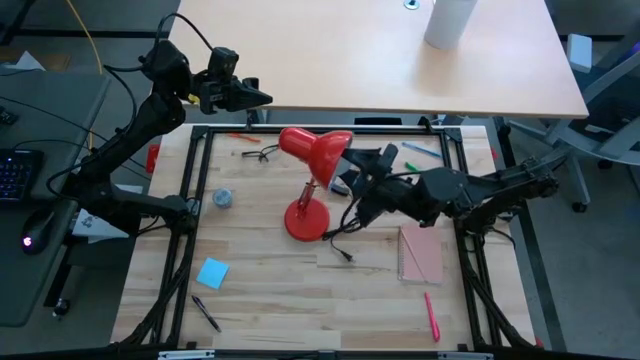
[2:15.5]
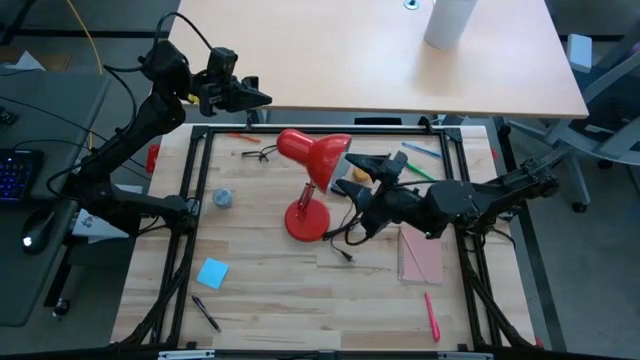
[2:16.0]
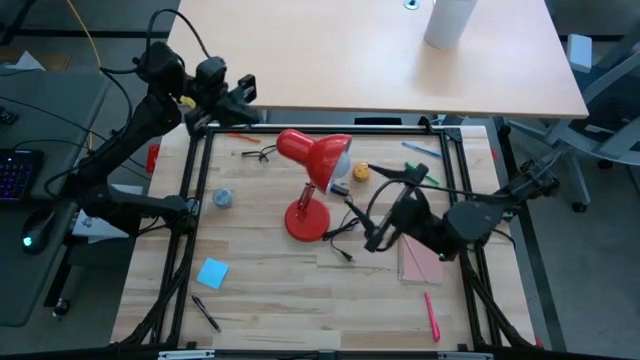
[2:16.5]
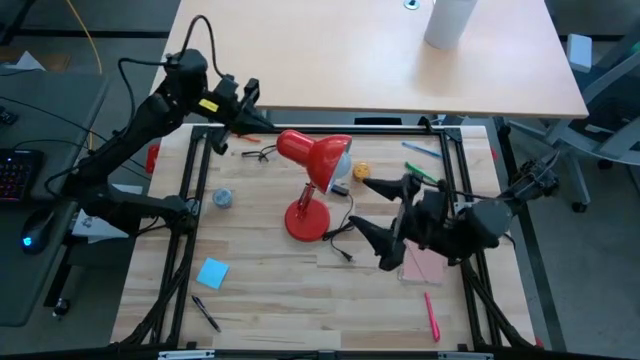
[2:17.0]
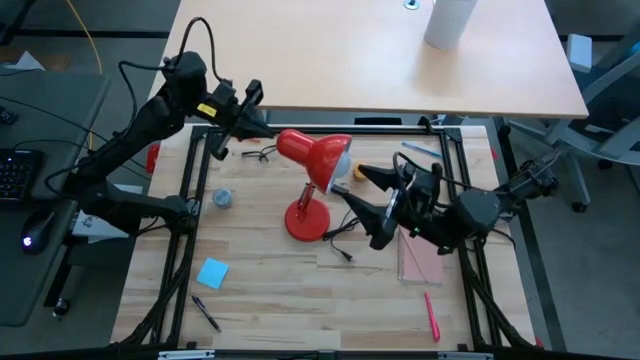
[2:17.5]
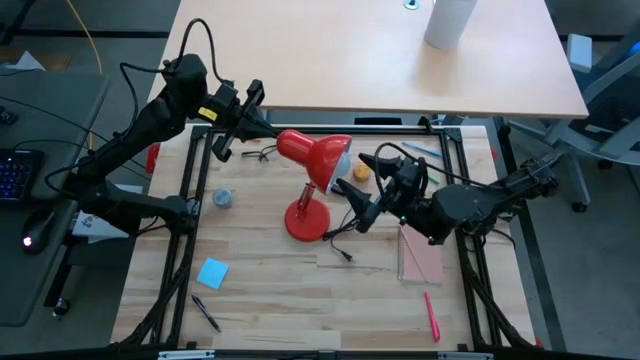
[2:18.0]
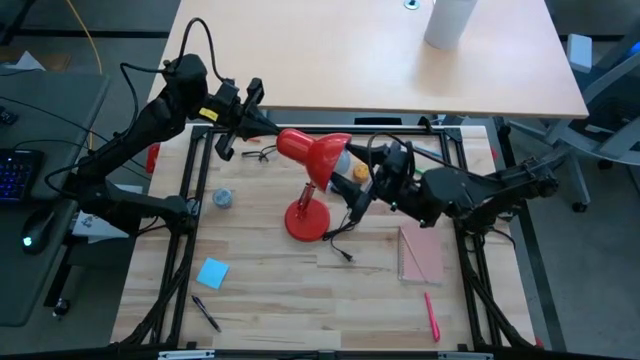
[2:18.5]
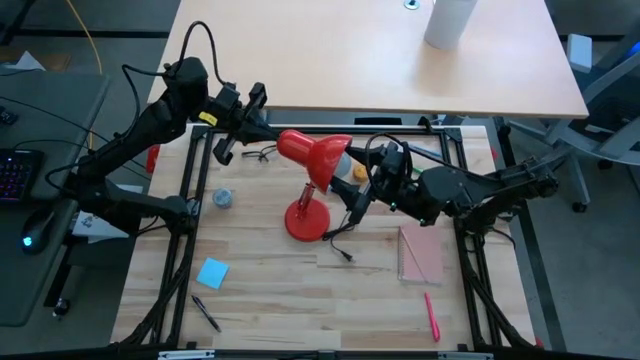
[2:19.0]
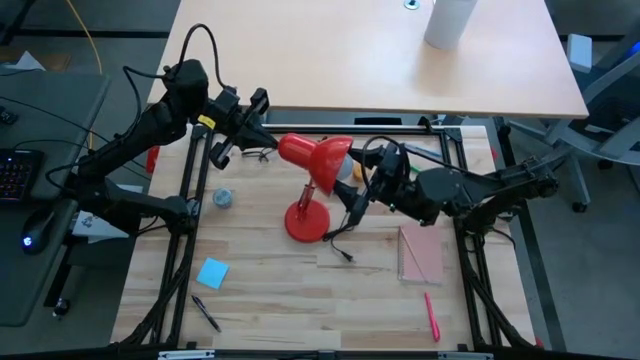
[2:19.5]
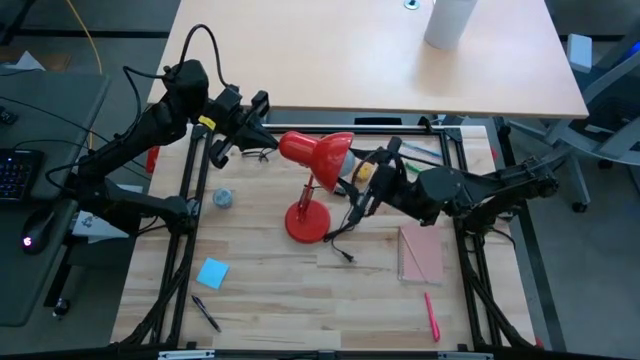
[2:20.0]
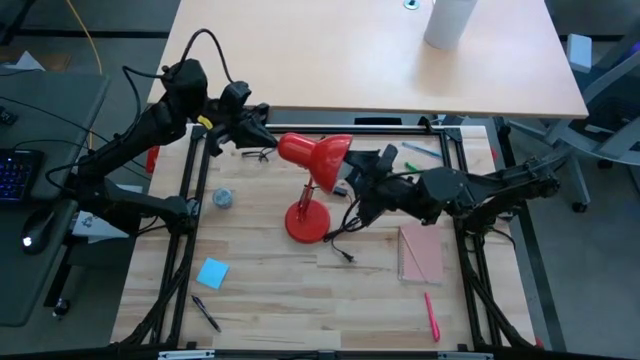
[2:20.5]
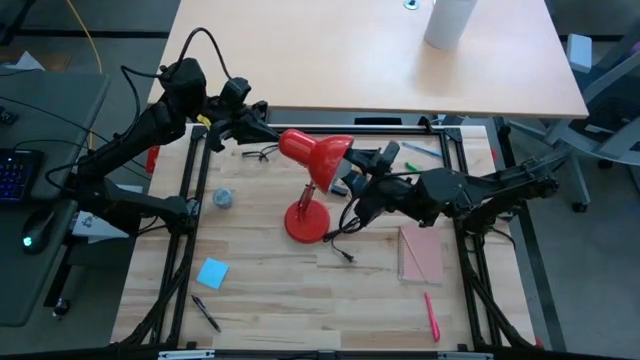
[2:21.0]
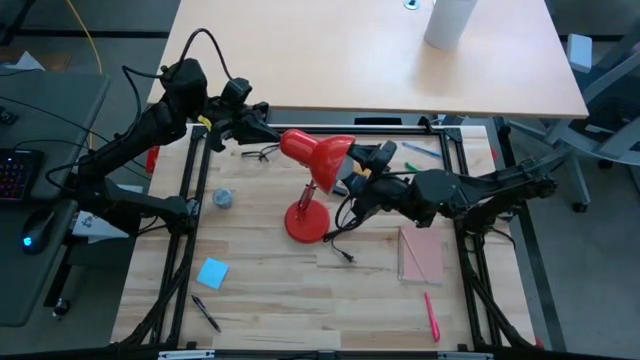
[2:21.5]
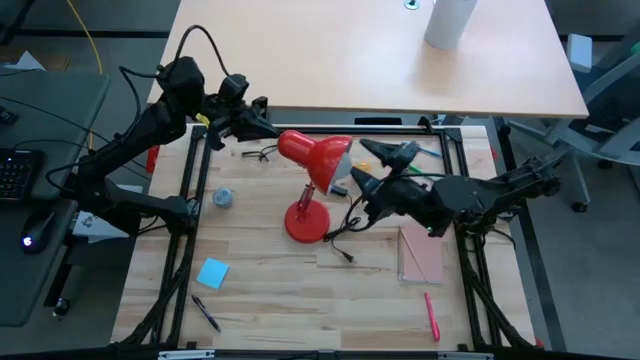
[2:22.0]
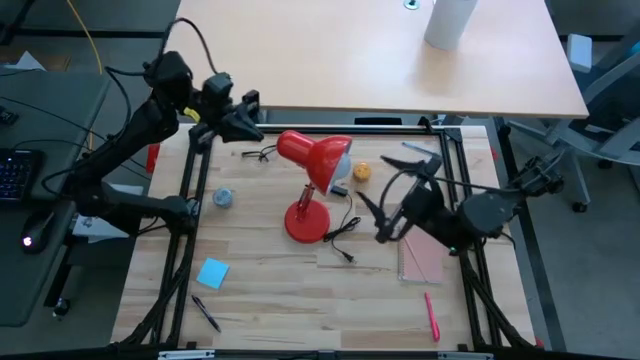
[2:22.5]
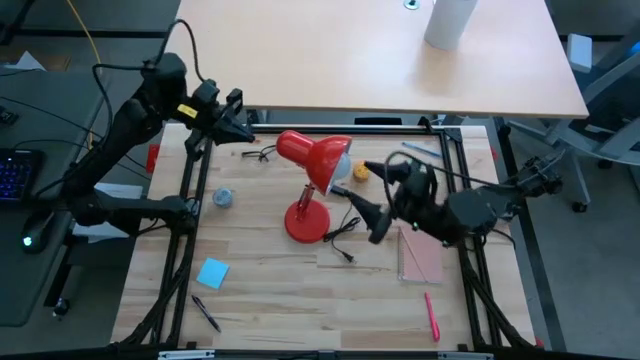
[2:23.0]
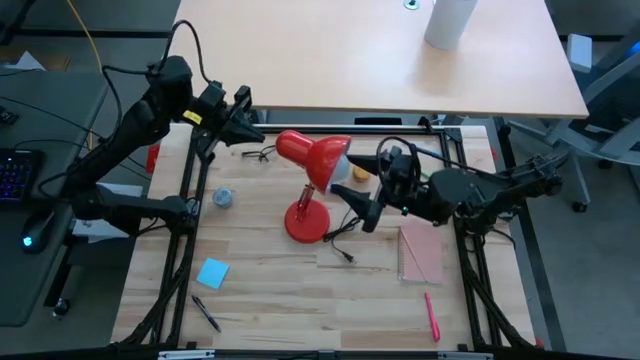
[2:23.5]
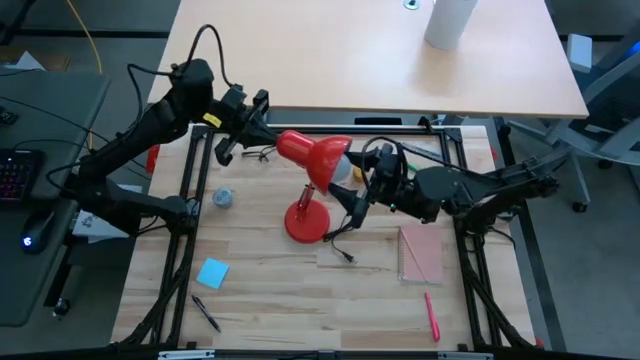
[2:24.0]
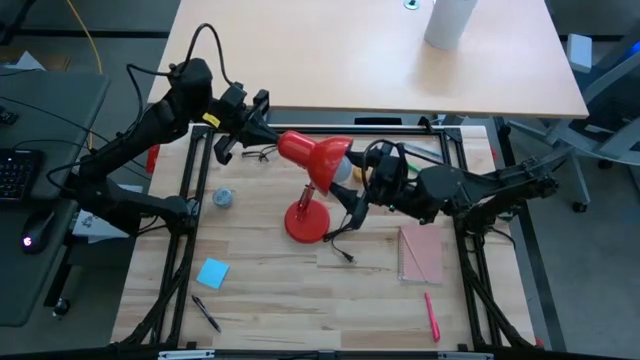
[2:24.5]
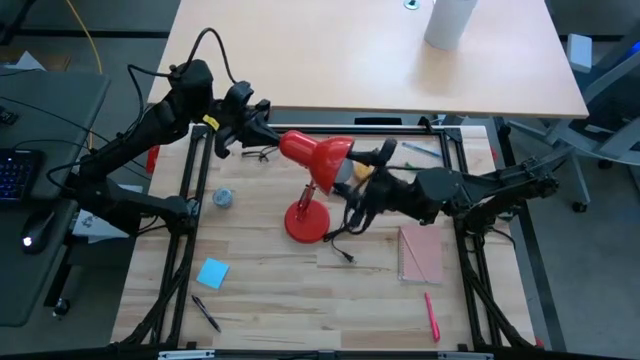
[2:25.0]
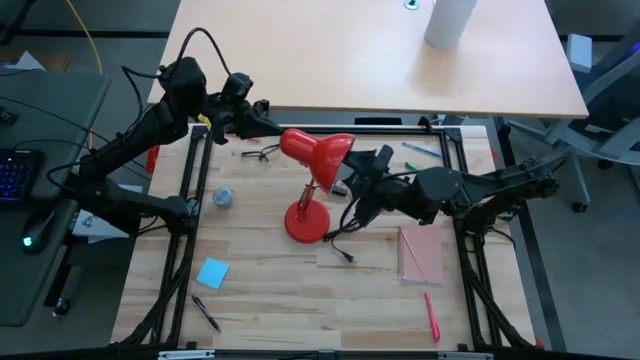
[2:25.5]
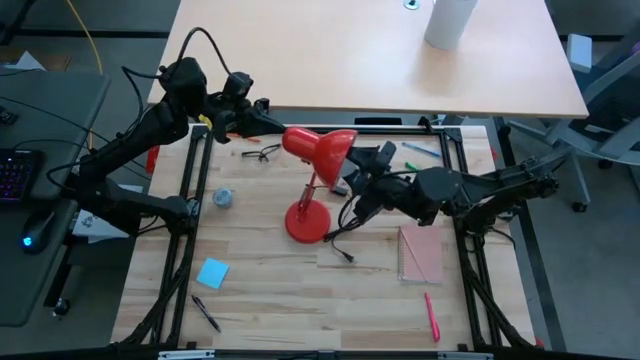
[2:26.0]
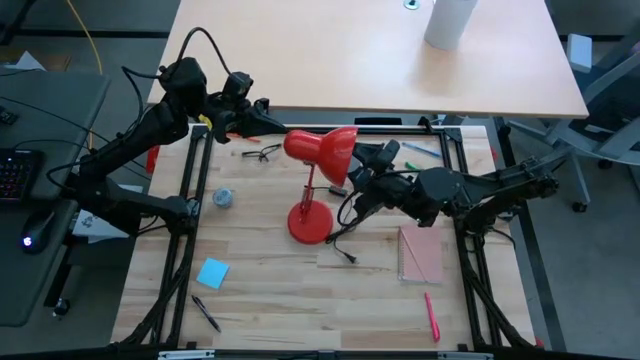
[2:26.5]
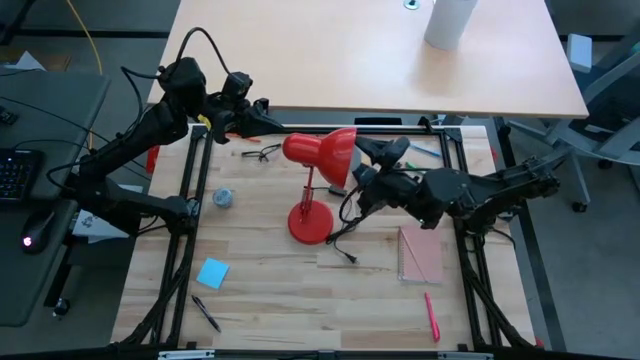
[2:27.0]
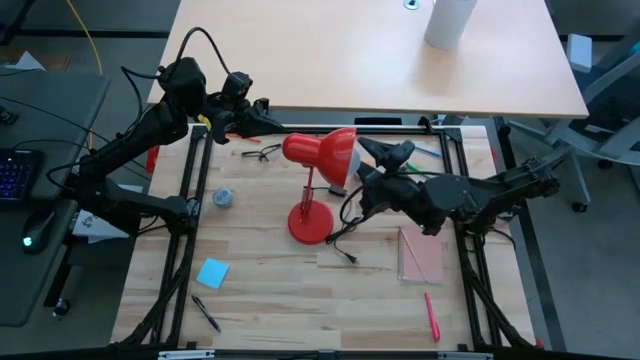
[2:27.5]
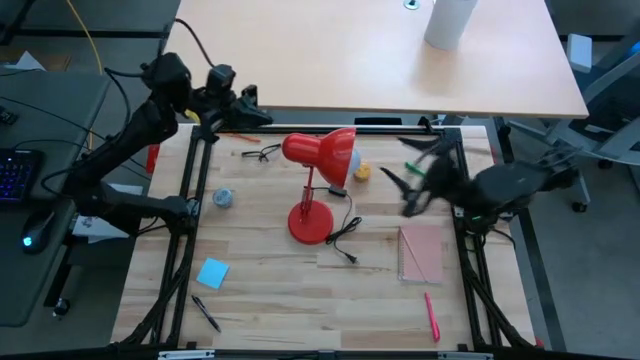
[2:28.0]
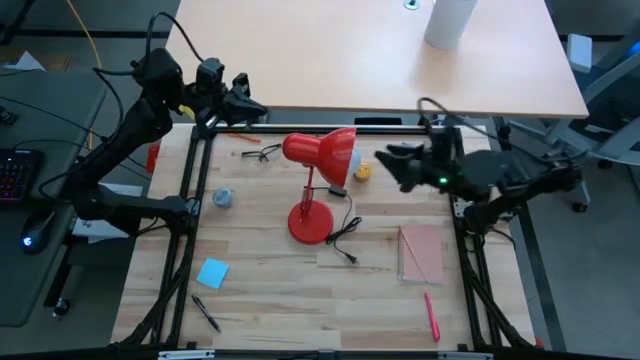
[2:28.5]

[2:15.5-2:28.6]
Task: Screw lightbulb
Remove the lightbulb into the lamp

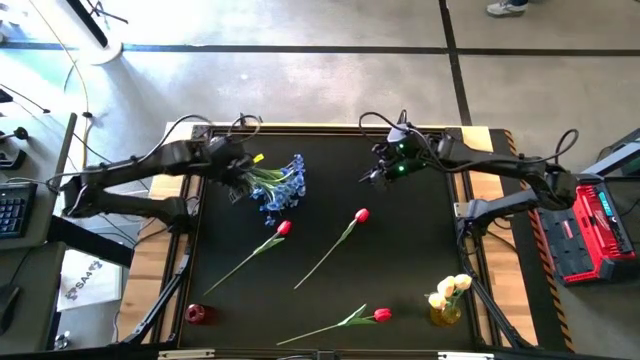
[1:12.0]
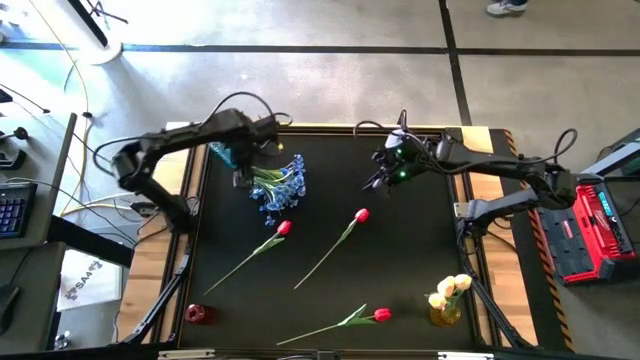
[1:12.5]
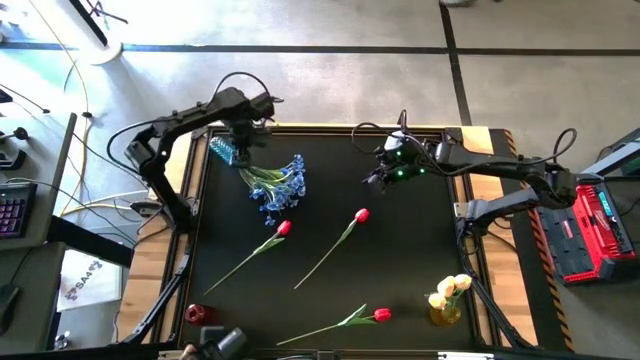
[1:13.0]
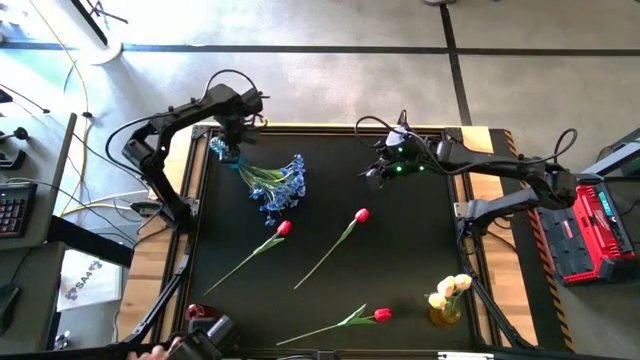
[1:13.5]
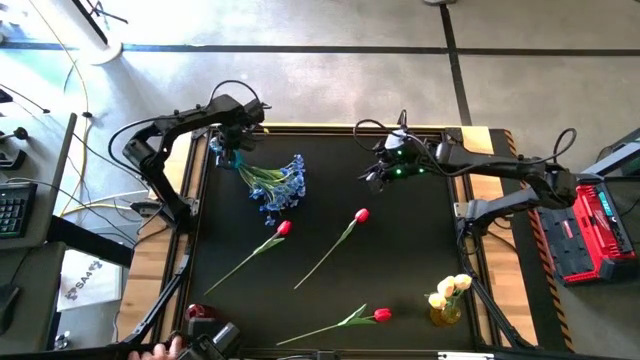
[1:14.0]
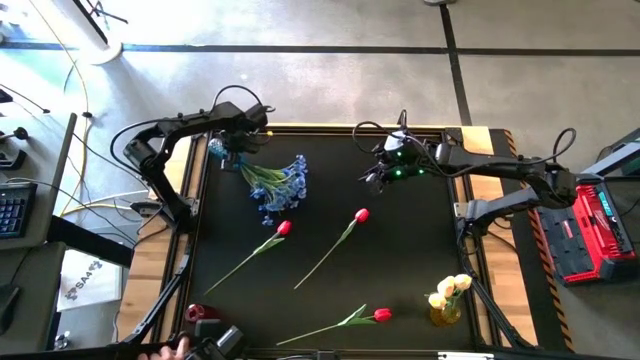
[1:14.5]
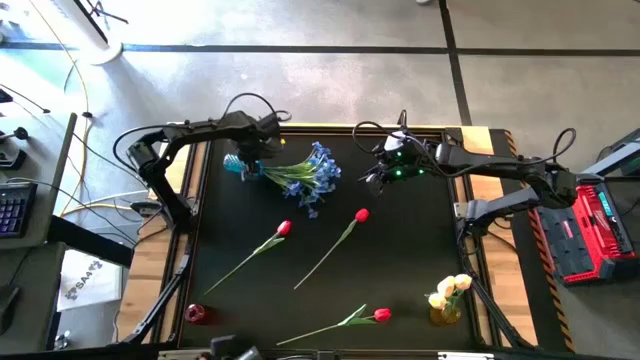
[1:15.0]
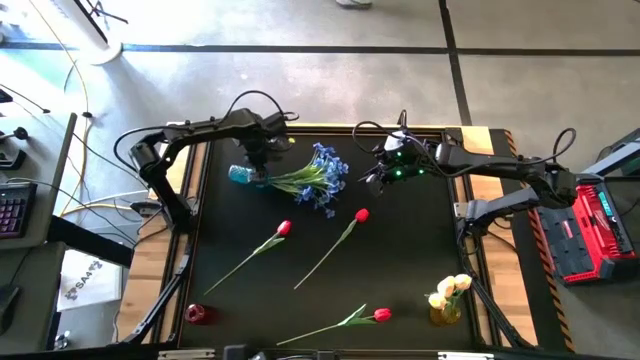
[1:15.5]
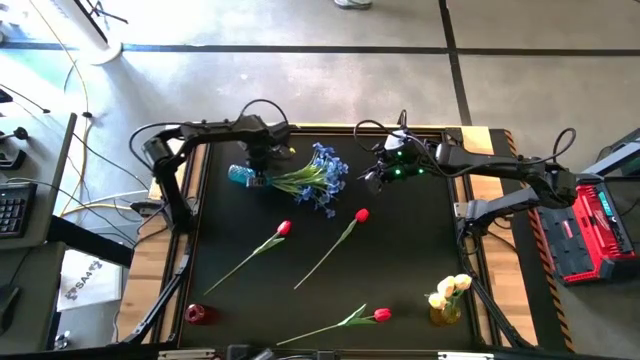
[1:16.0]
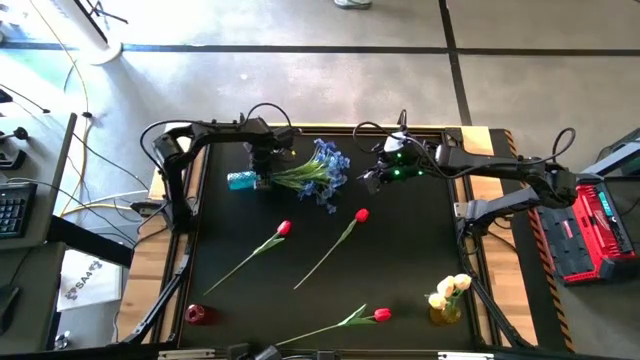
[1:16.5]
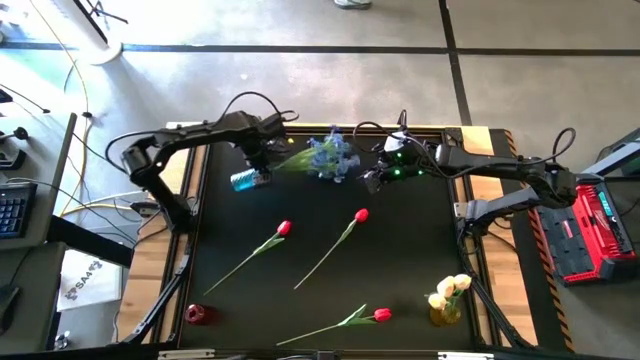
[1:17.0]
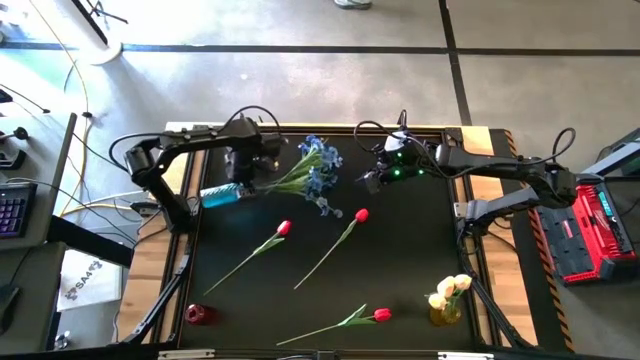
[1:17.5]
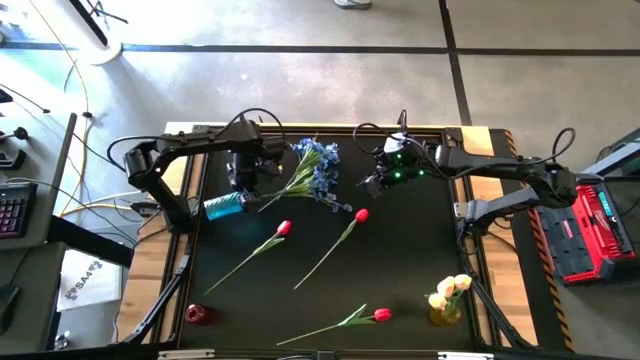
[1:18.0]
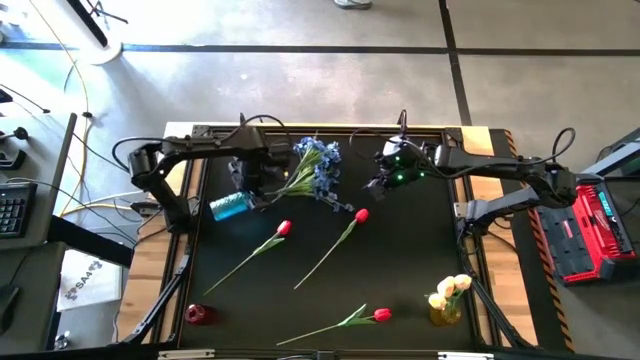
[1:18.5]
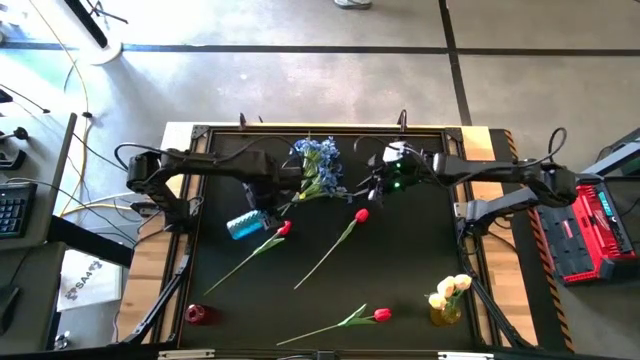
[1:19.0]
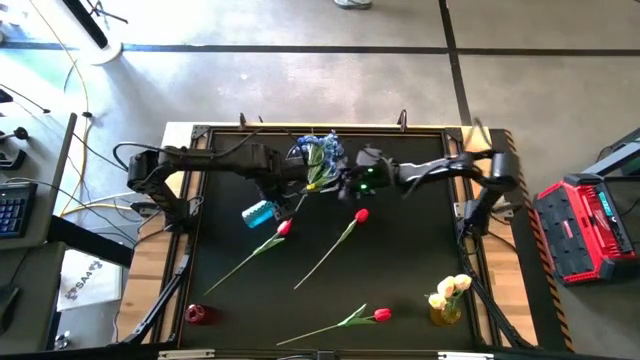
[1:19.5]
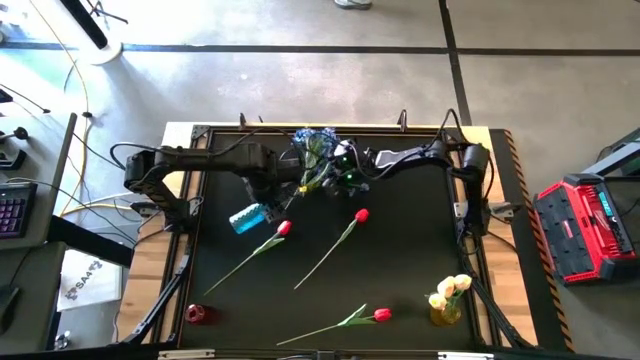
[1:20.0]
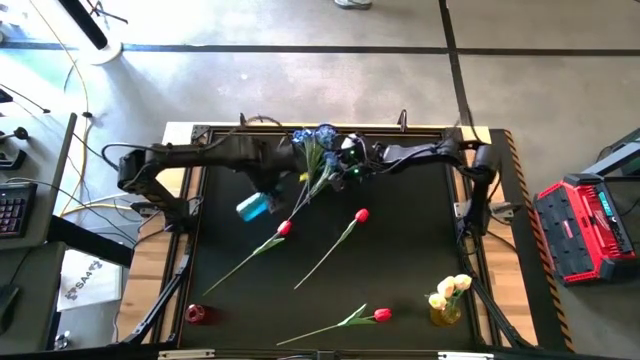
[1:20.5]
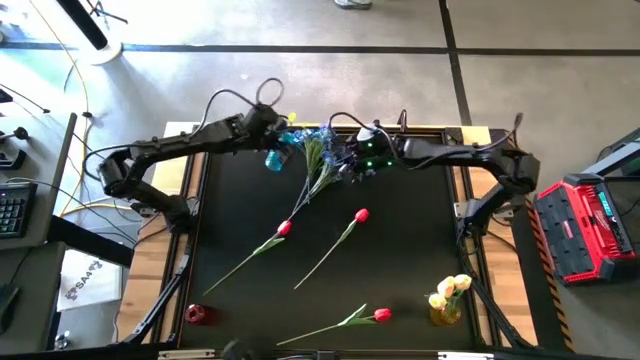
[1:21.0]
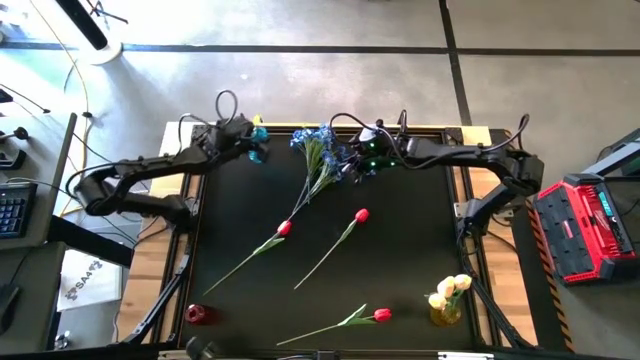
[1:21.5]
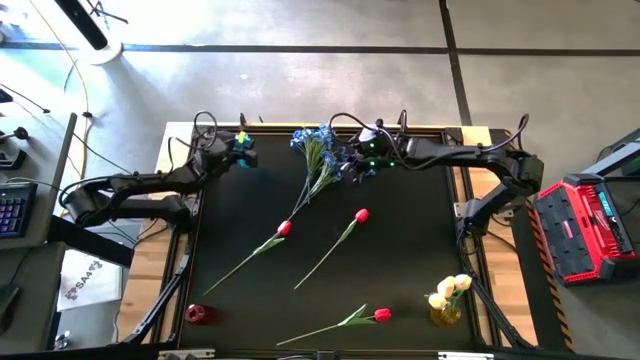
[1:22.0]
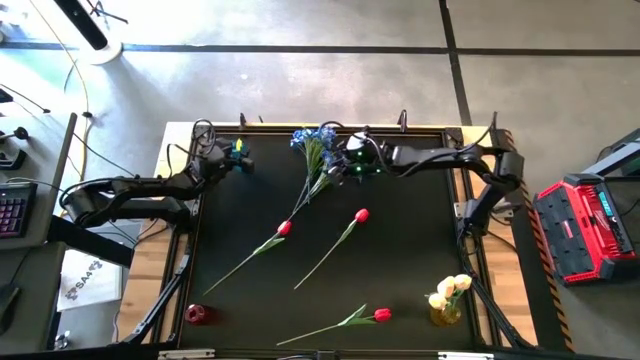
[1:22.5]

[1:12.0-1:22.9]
Task: Sort flowers into vase by color
Adjust the blue vase on the top left of the table
